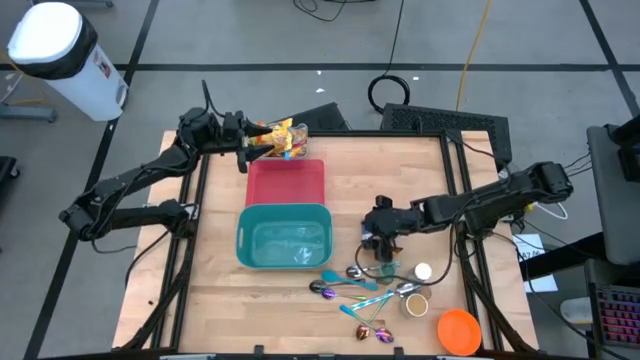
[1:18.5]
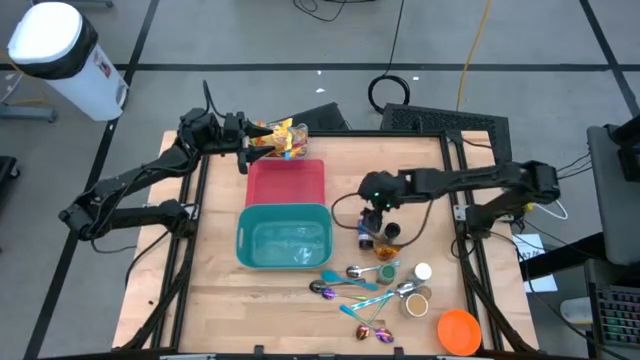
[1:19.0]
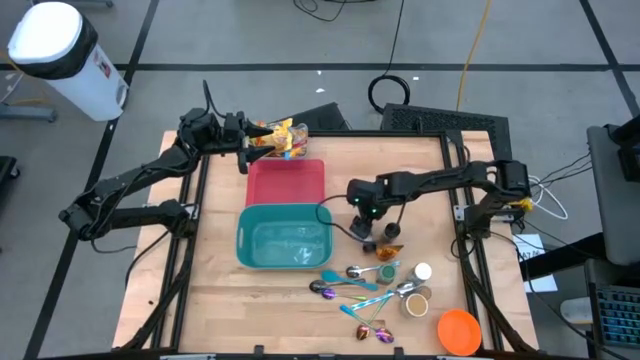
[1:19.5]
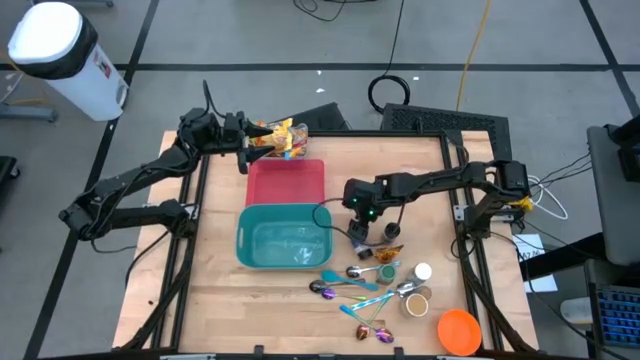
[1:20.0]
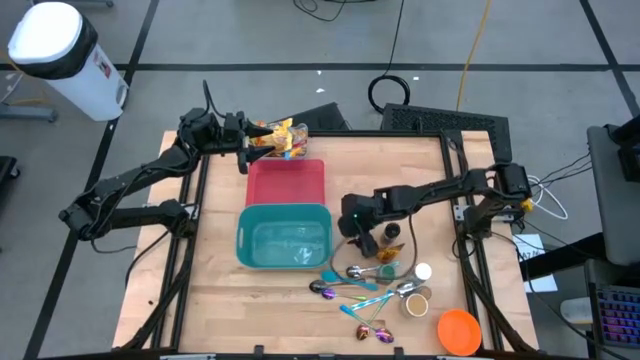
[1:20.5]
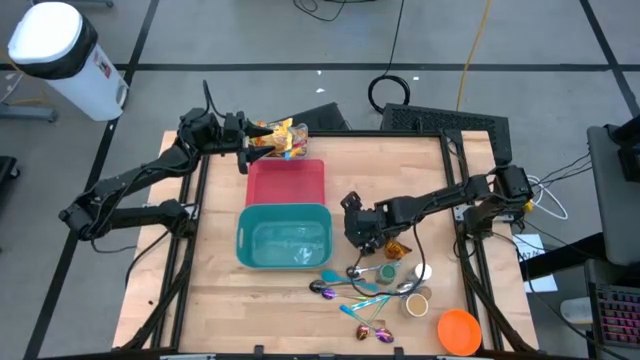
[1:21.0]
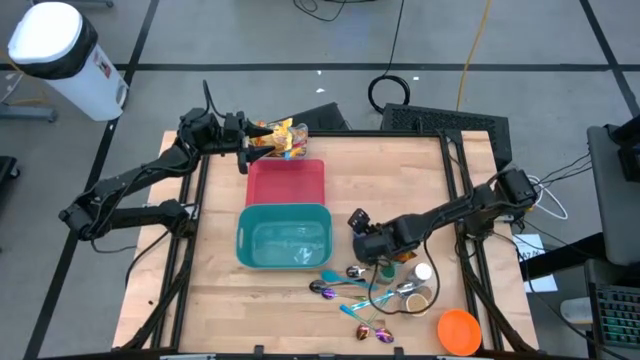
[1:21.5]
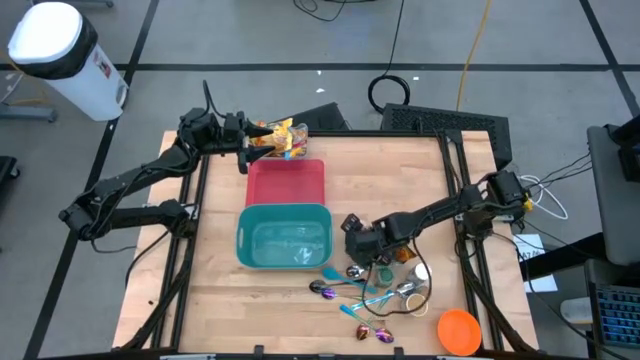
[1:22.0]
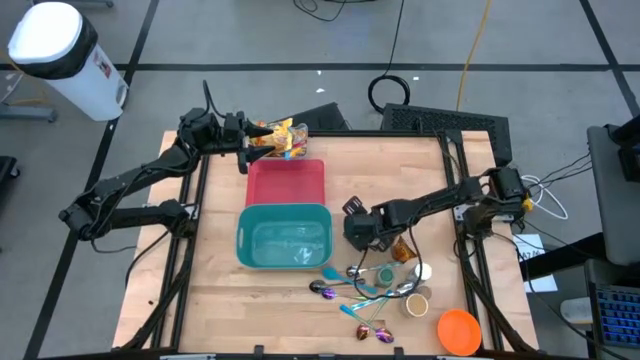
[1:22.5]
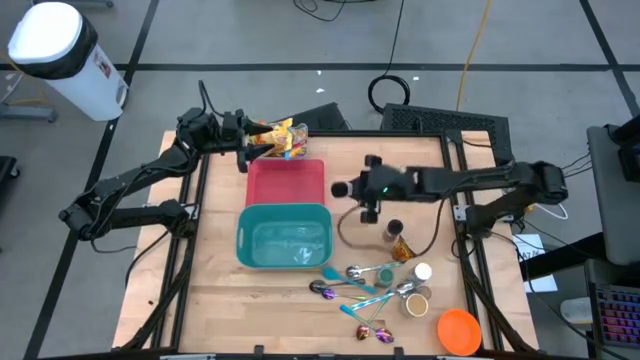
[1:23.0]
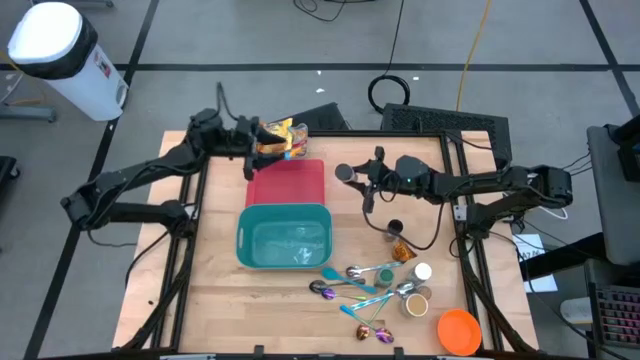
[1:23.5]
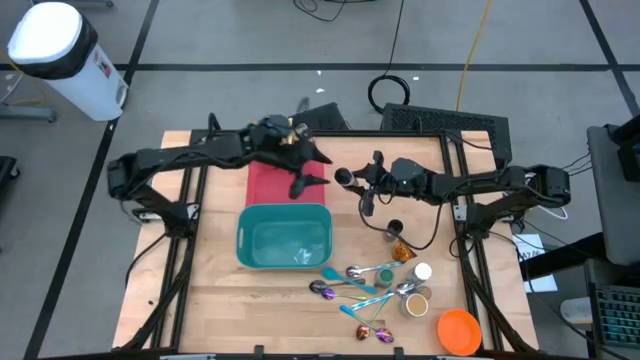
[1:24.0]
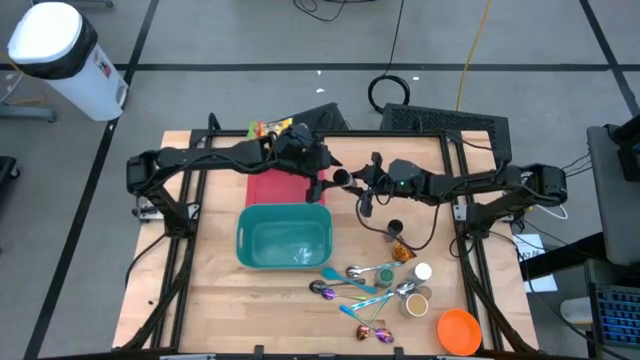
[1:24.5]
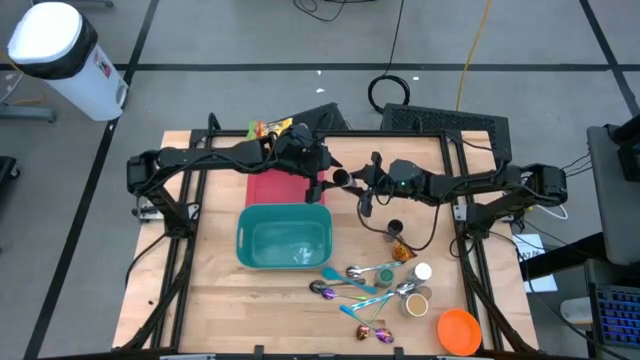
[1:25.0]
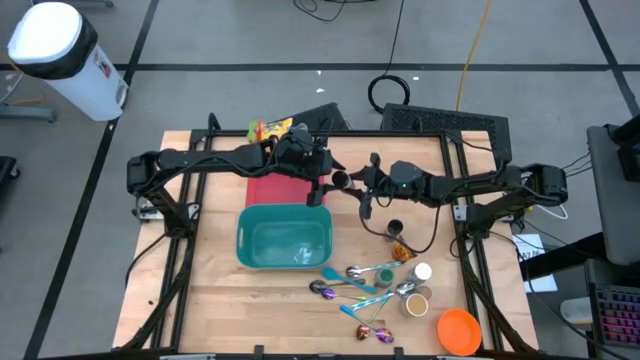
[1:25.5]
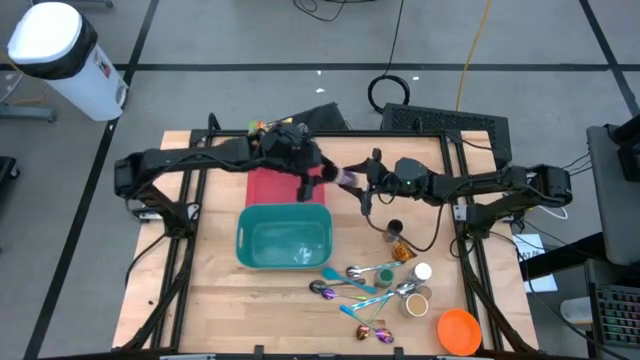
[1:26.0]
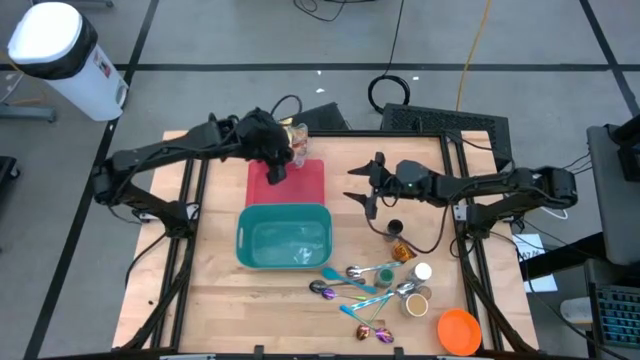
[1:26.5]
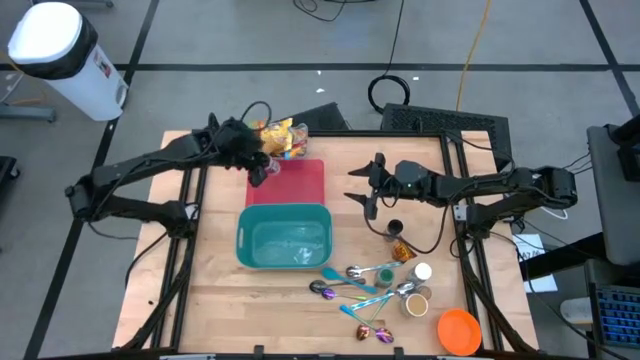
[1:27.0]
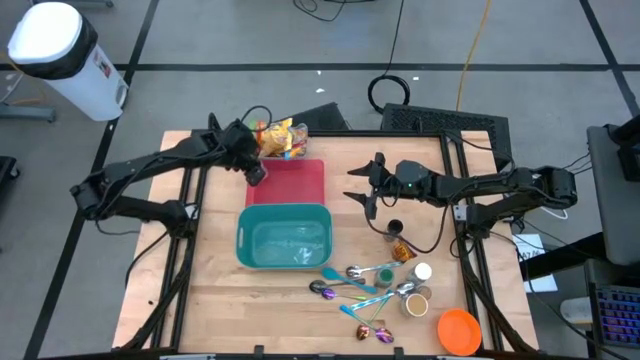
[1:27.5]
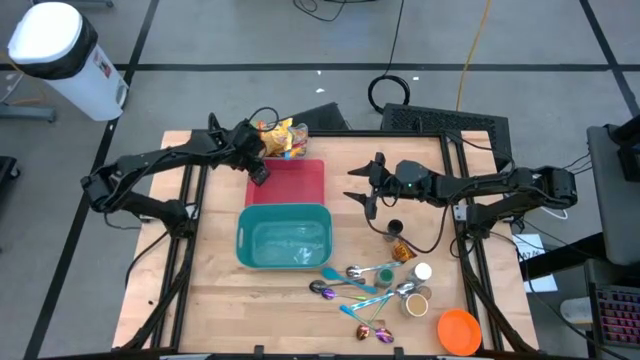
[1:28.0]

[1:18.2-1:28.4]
Task: Pick & Place Food Item
Put the purple seasoning bottle into the red bin

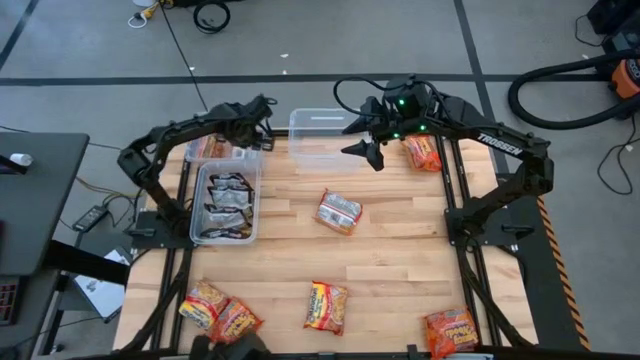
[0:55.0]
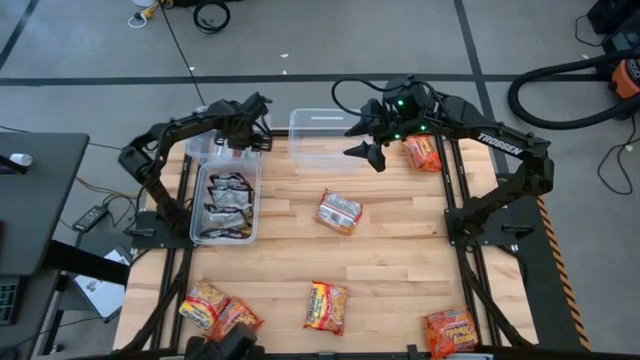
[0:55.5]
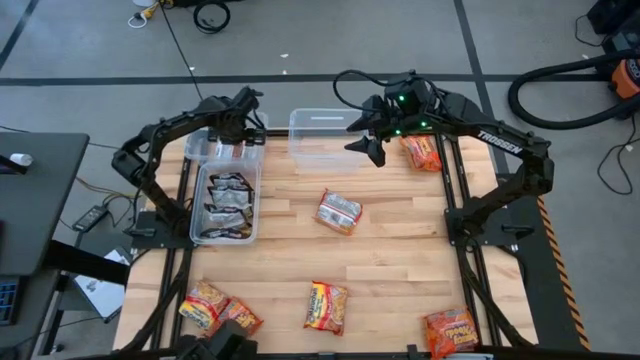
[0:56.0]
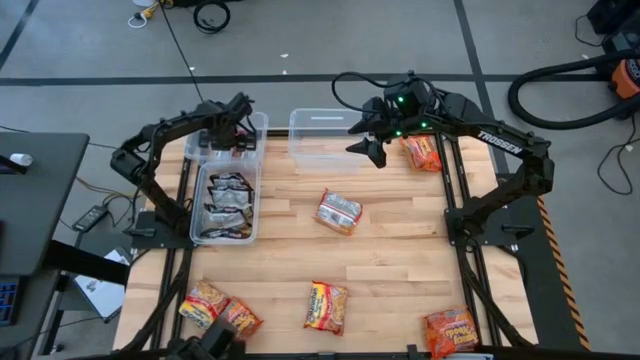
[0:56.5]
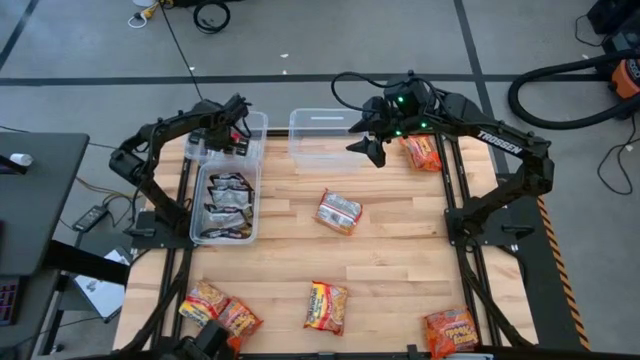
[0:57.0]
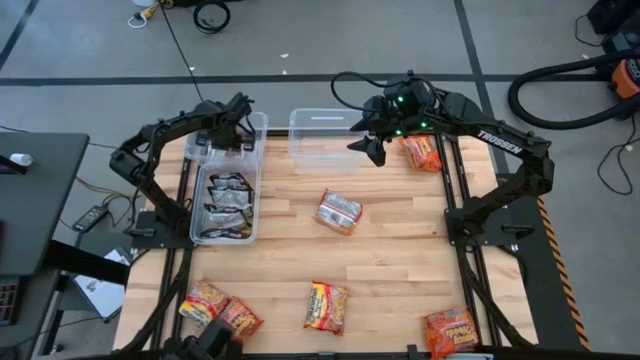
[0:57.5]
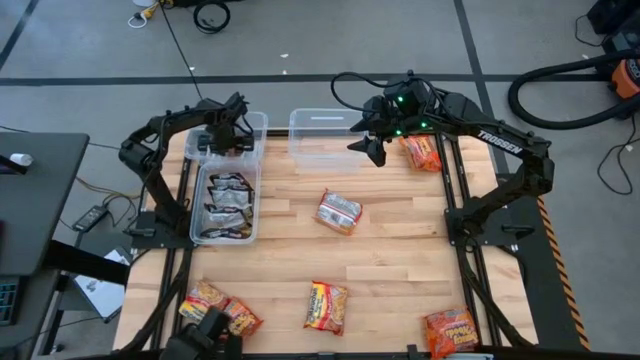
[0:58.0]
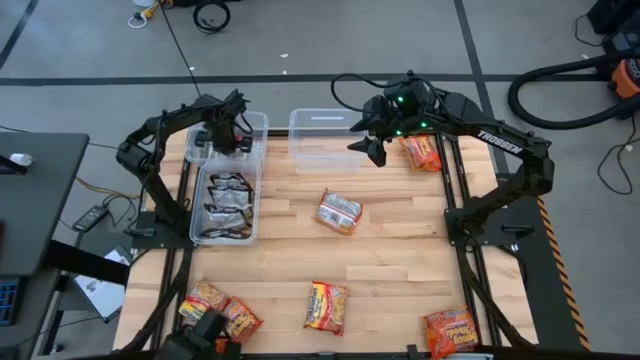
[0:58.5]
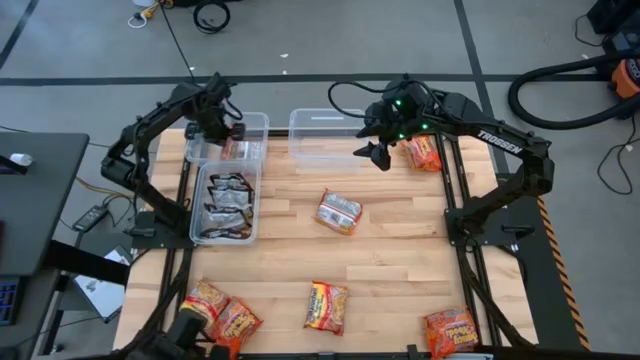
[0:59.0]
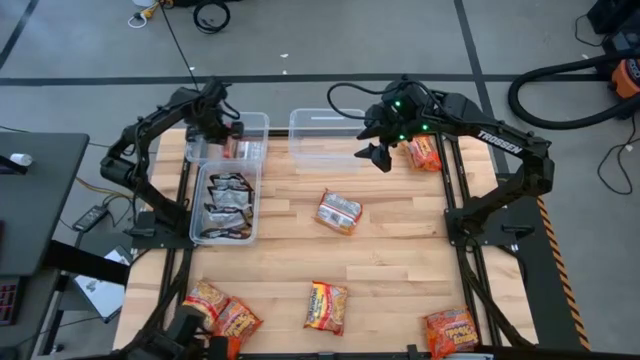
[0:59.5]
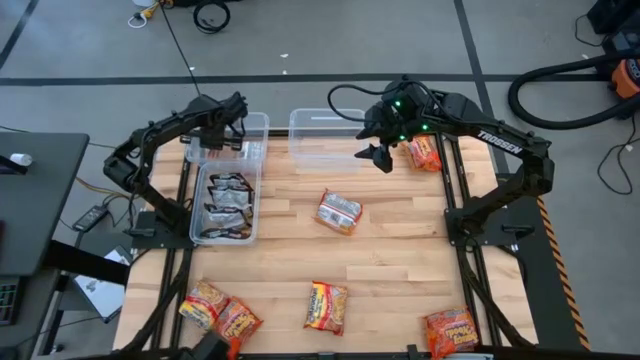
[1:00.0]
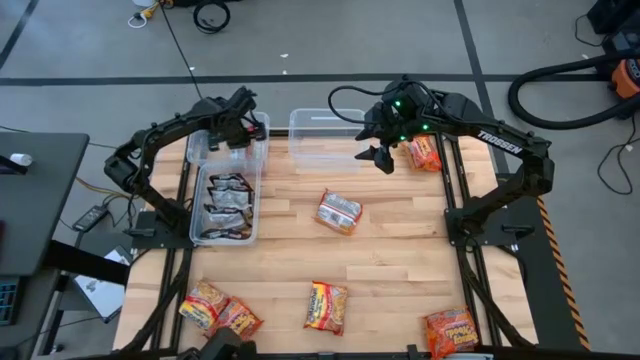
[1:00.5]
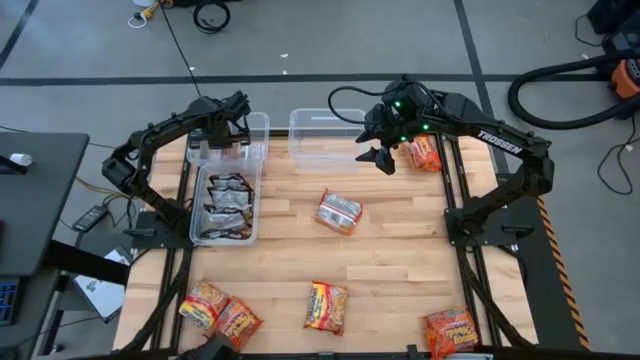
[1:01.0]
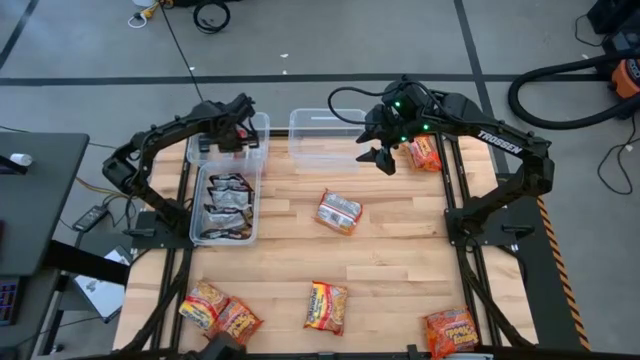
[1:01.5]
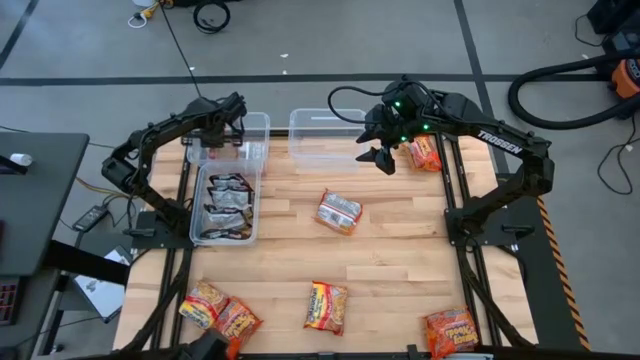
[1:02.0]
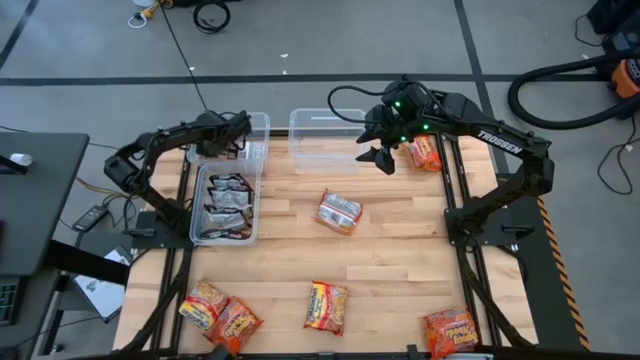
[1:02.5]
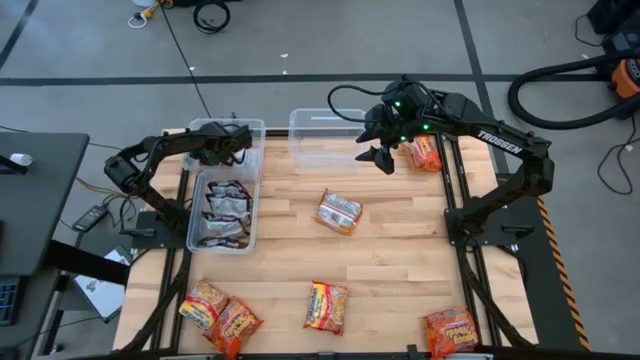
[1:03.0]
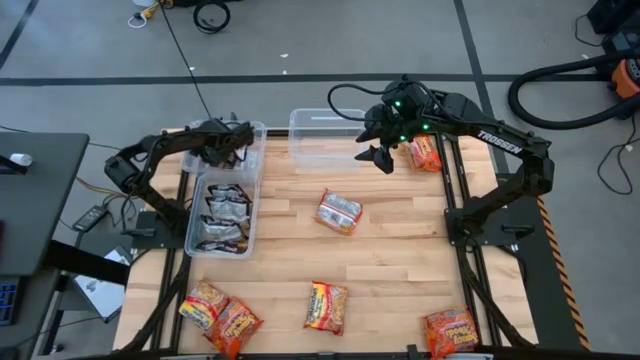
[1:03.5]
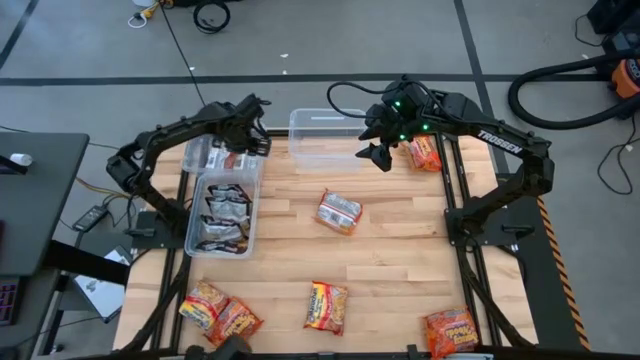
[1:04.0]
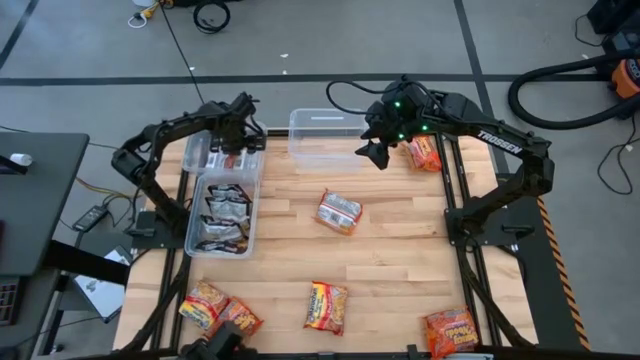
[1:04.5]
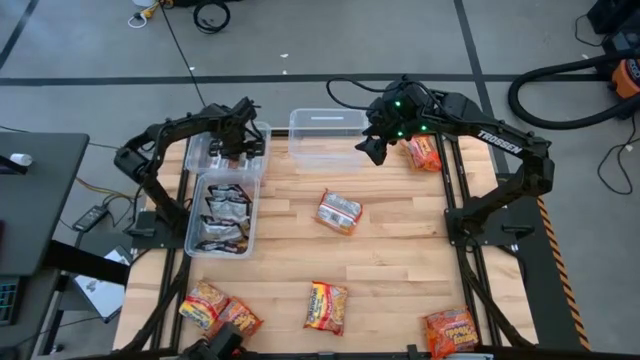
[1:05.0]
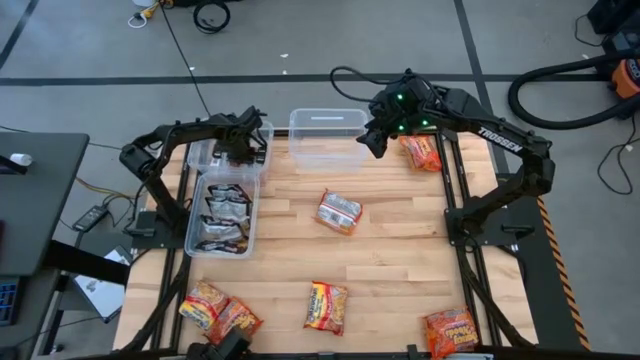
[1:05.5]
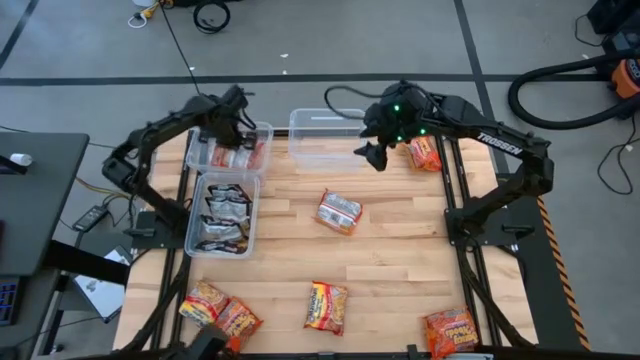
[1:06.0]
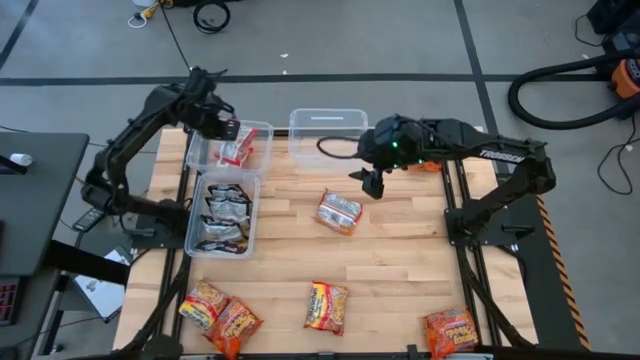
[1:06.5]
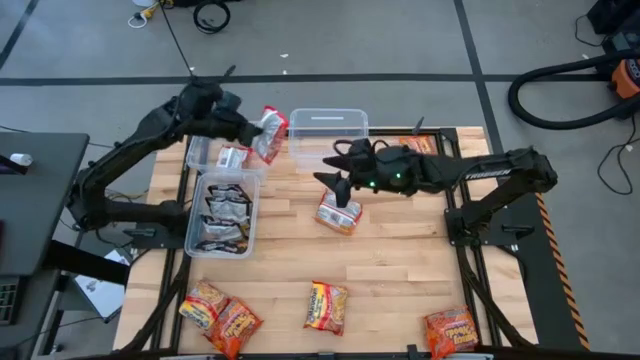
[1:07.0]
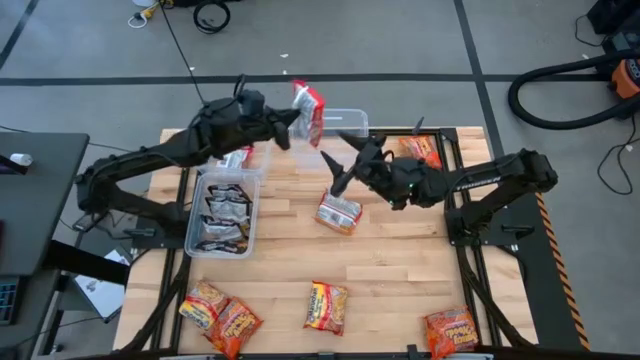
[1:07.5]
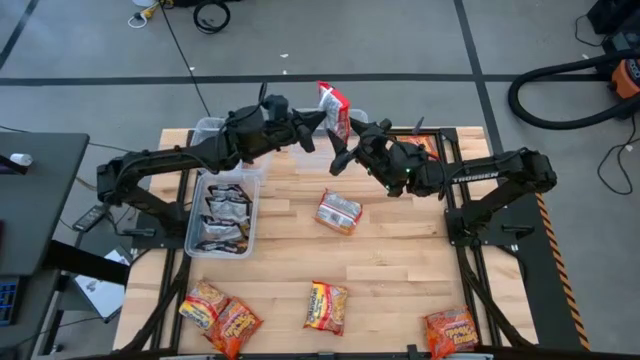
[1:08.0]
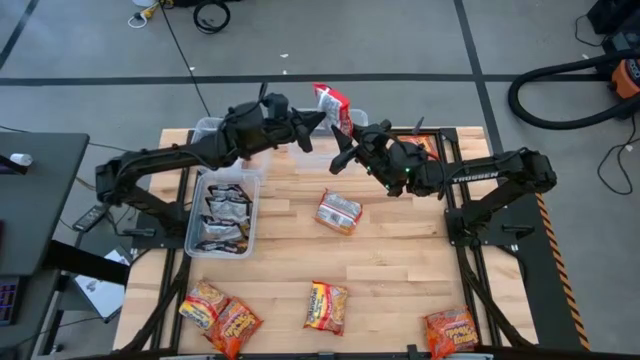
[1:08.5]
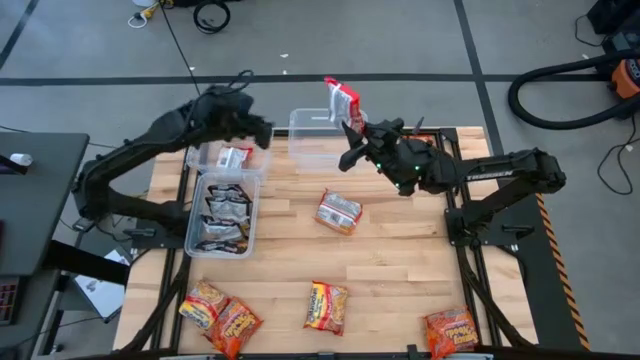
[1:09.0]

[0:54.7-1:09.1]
Task: Sort Maruchan noodles
Adjust the noodles pack from the bin
